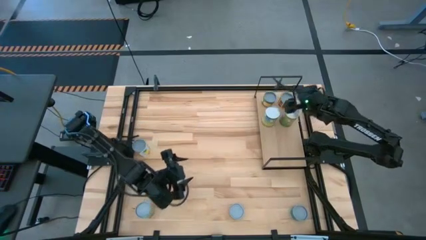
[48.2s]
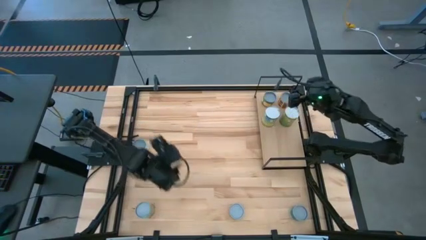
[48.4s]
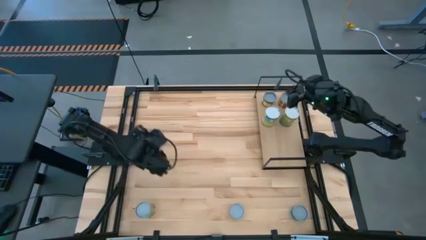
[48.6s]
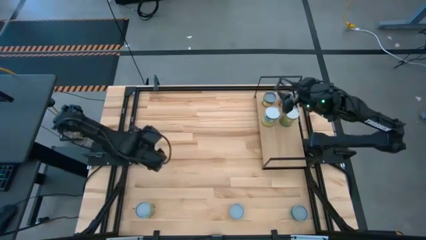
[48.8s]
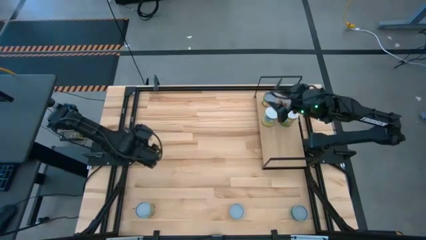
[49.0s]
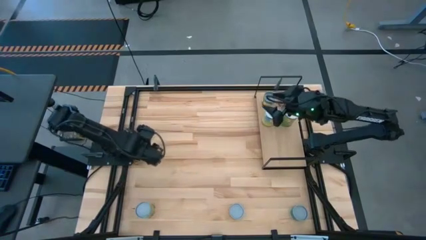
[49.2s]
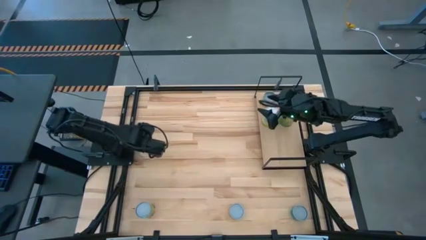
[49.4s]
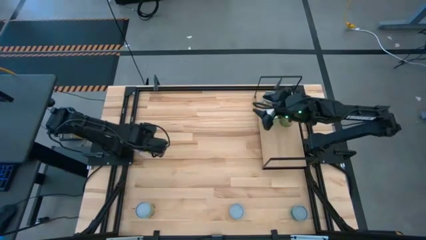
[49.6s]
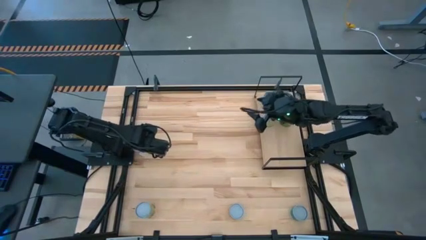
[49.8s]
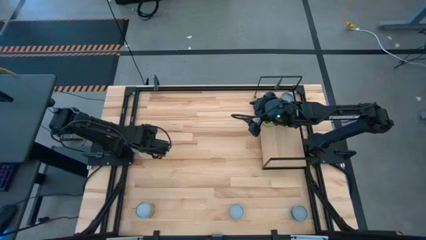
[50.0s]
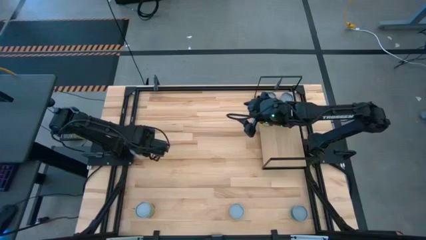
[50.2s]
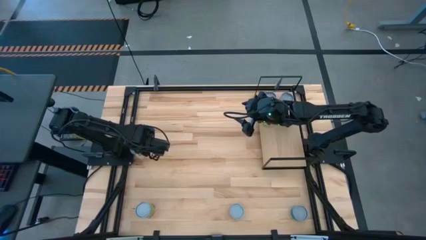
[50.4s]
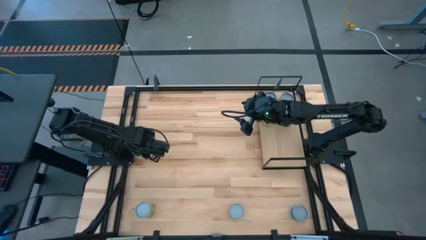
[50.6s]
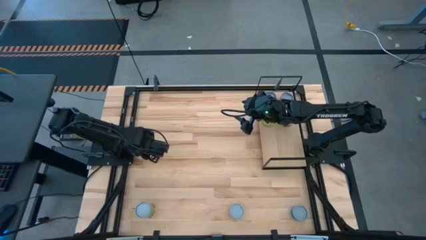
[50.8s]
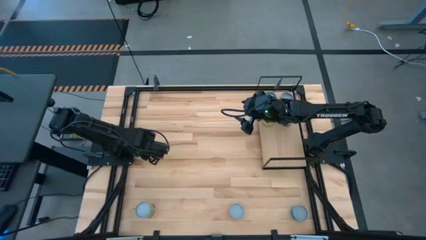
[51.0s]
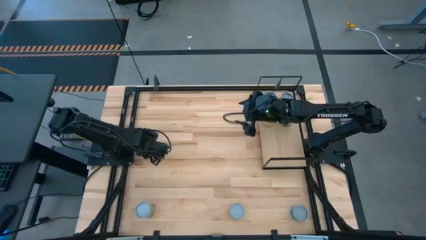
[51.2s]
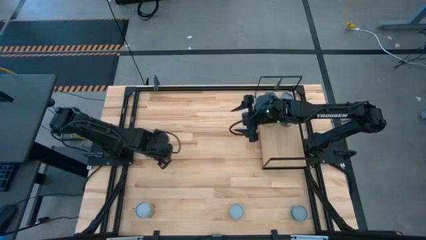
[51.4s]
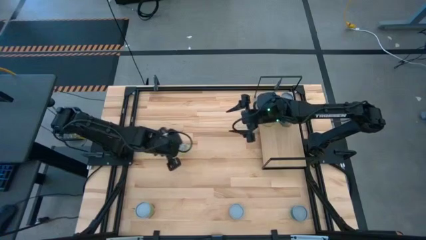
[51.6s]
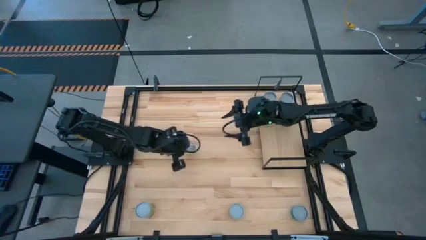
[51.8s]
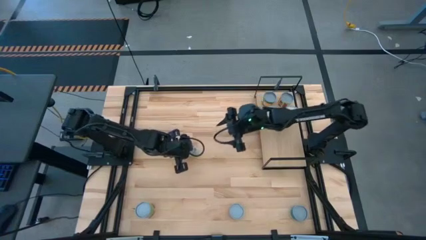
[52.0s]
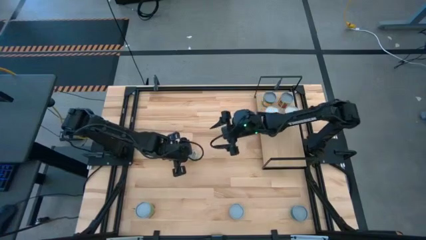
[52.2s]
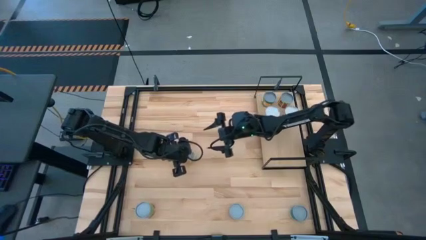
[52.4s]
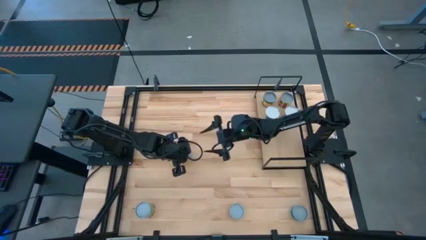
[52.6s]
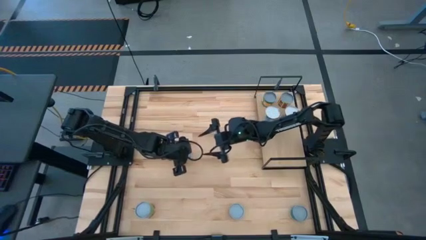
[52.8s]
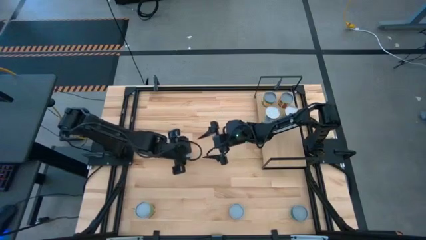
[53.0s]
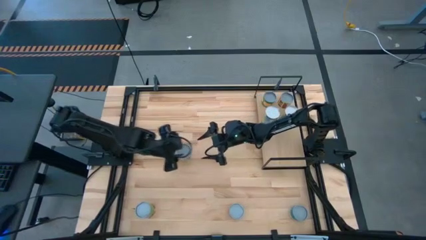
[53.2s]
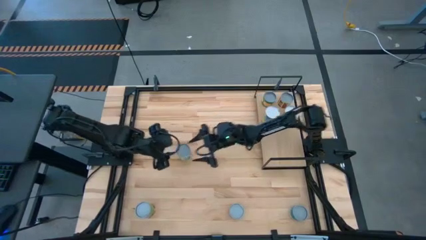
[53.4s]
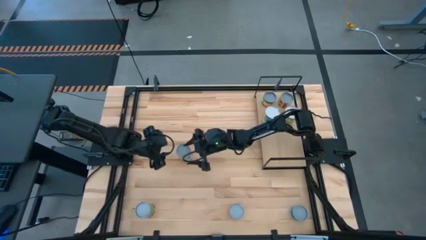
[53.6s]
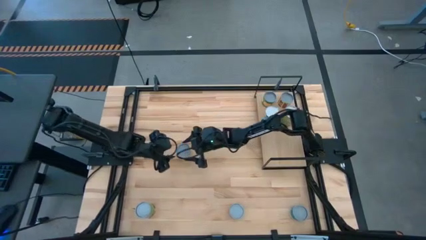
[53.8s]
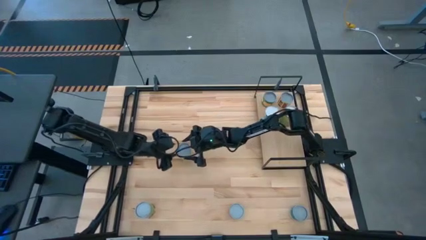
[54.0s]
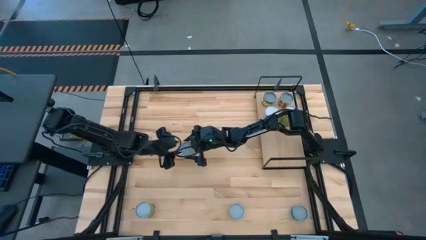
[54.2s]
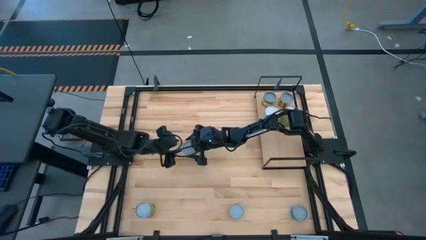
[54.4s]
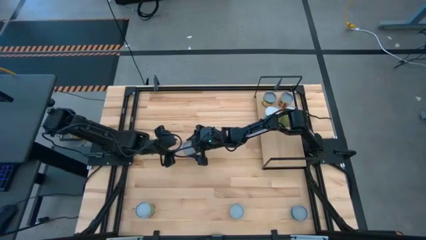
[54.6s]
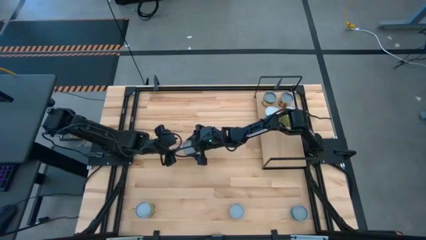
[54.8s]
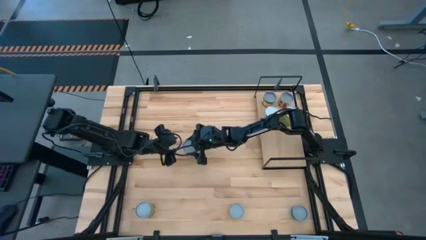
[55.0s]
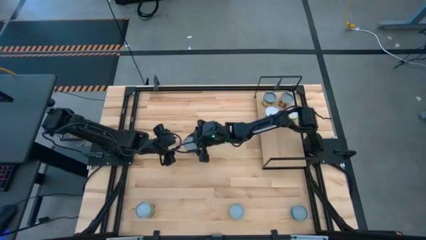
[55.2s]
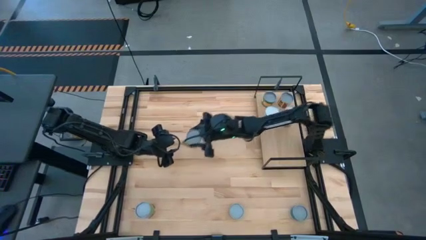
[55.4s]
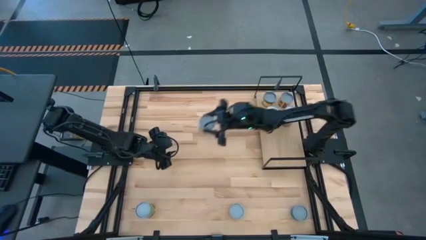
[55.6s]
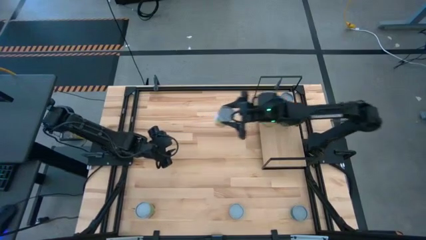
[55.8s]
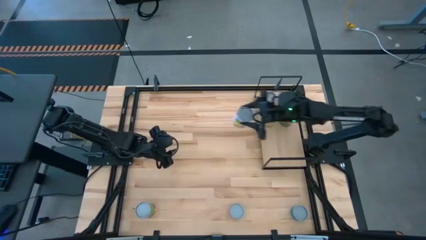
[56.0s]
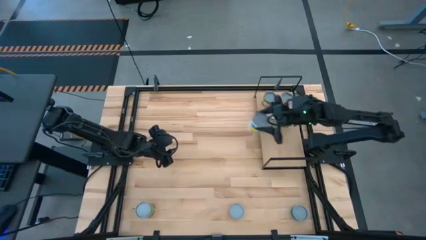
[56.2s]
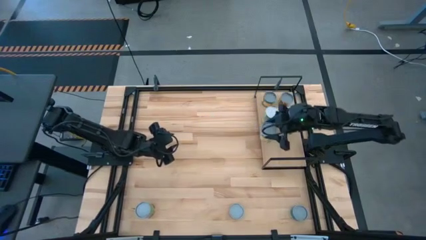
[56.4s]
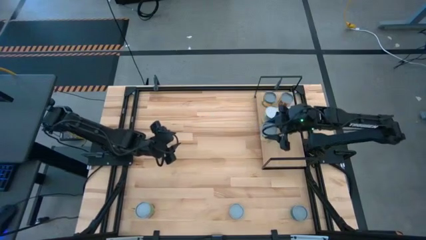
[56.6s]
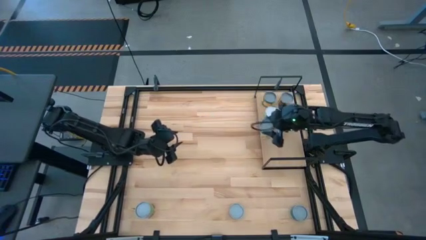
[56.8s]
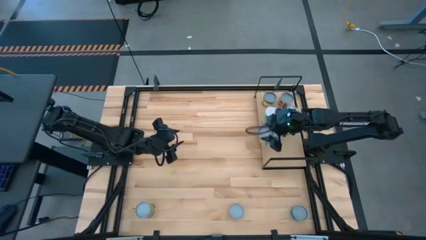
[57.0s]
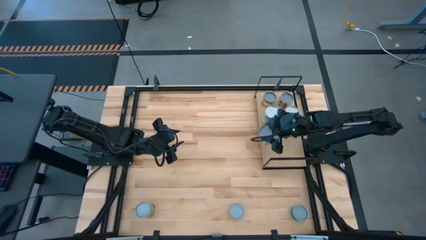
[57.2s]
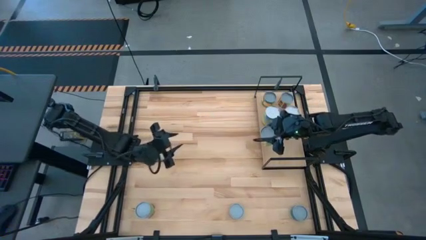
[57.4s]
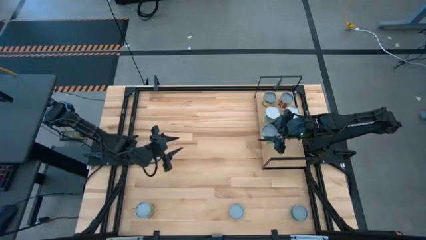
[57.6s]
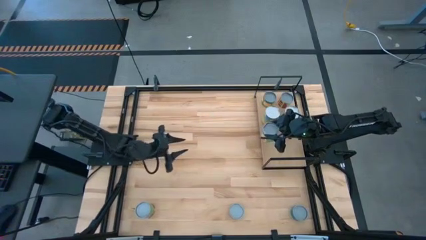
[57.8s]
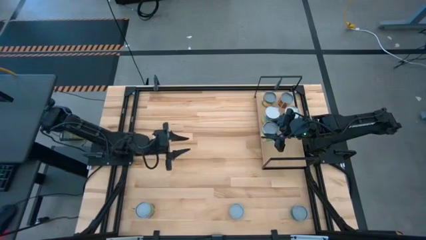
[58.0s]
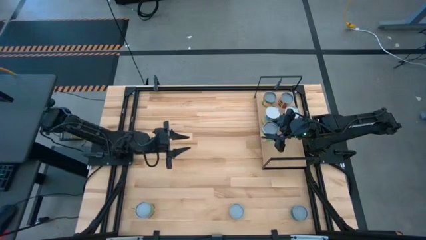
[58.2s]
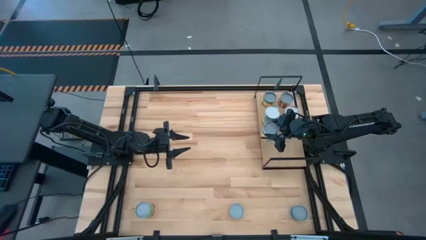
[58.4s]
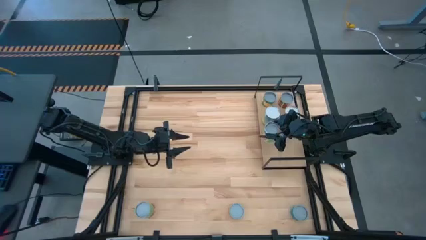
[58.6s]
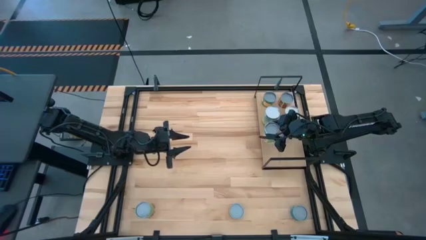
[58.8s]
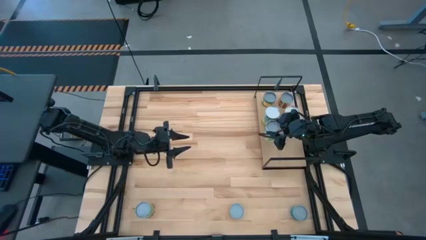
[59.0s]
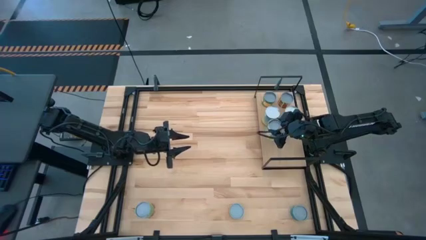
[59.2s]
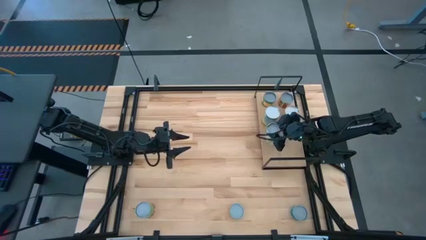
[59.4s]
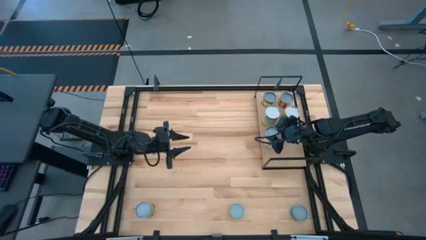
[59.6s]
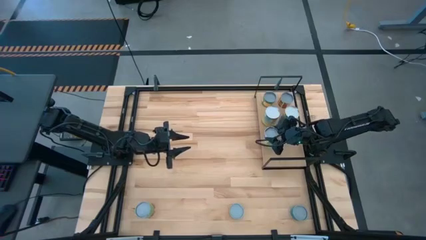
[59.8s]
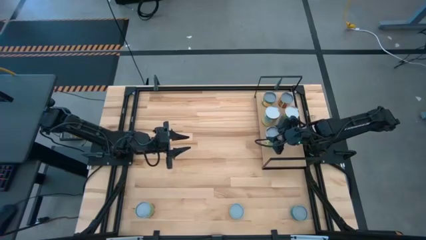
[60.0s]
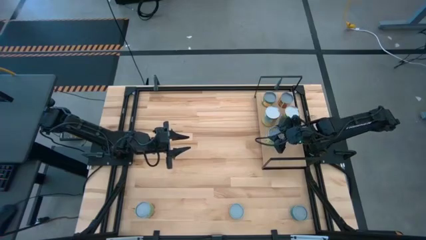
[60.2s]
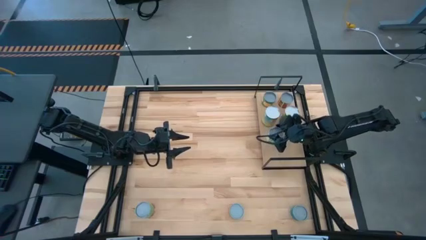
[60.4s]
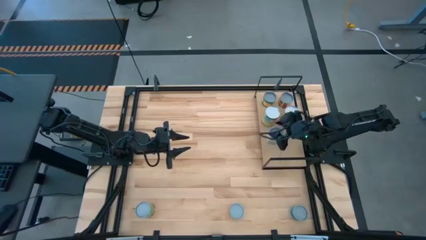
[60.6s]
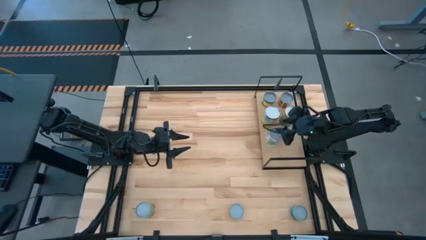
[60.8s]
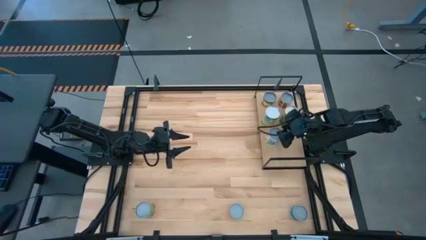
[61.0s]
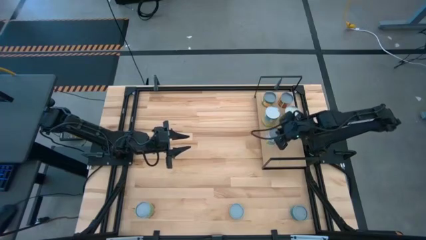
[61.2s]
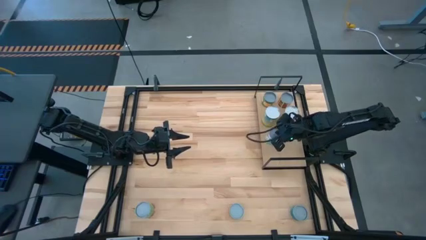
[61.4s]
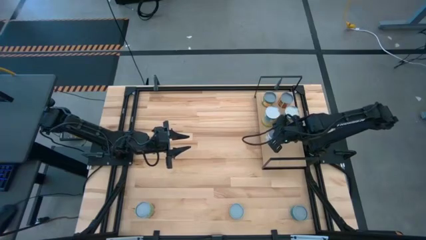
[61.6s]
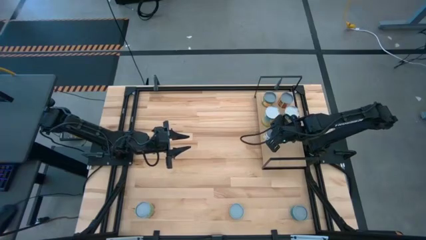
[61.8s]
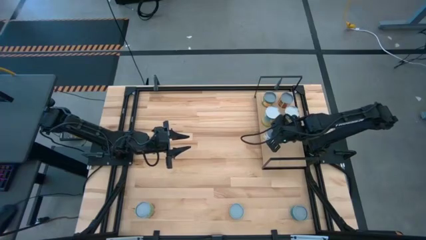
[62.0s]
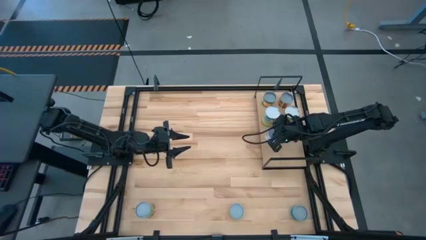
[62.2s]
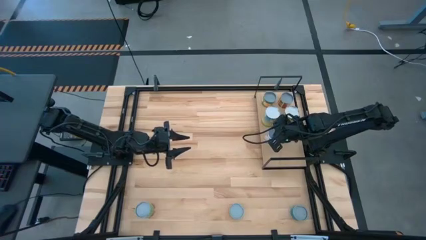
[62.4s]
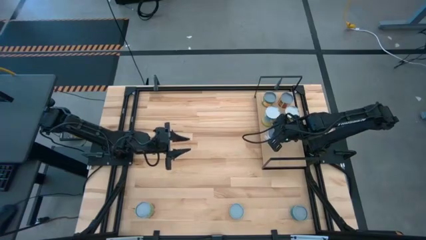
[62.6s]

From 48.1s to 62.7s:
Task: Pick and place cans onto a shelf
Put the canned mixed fruit on the shelf

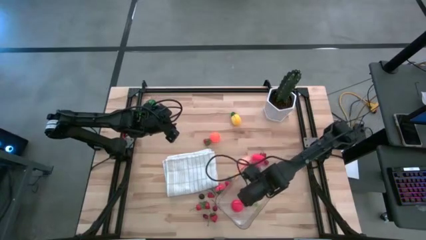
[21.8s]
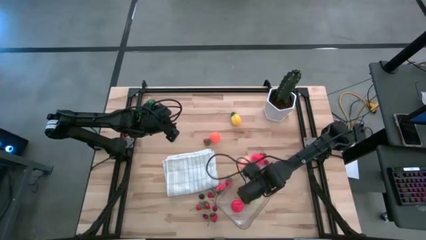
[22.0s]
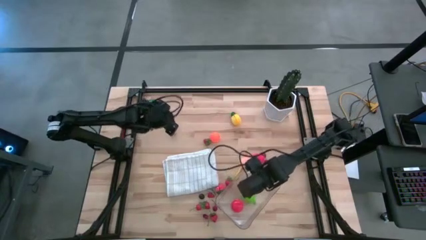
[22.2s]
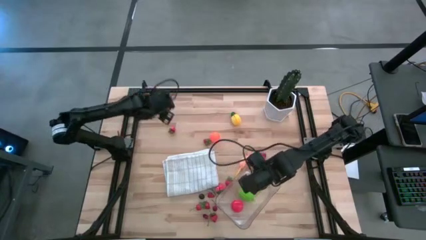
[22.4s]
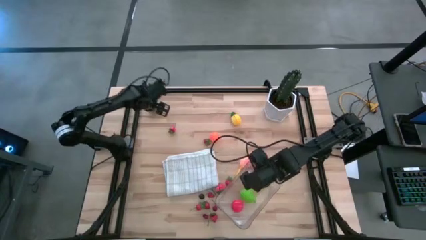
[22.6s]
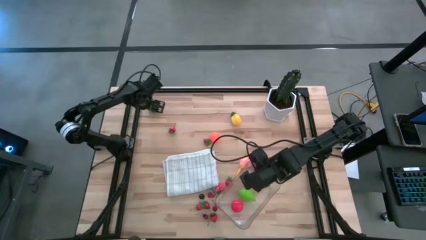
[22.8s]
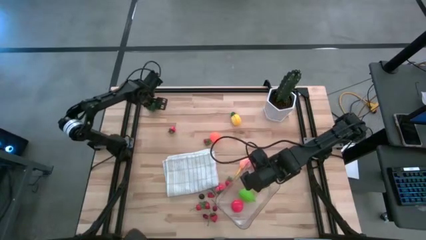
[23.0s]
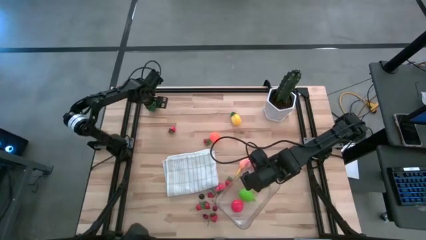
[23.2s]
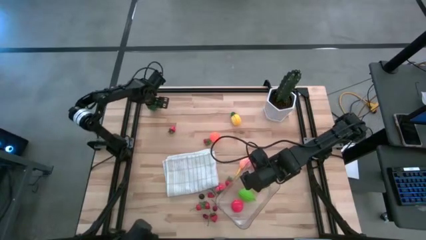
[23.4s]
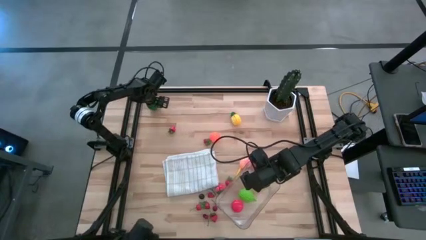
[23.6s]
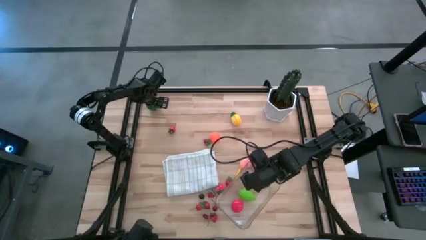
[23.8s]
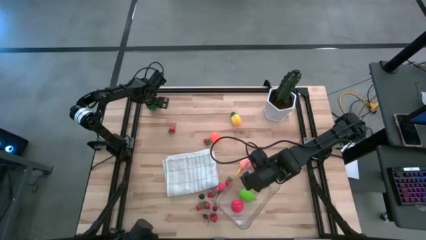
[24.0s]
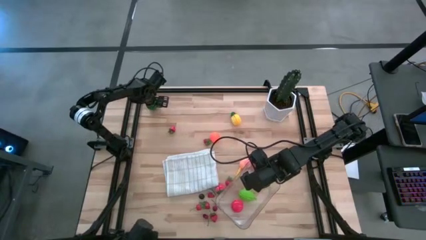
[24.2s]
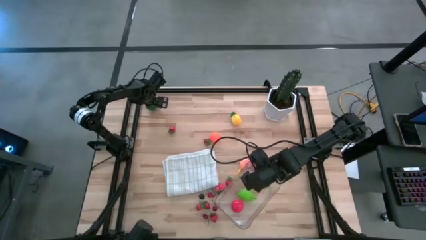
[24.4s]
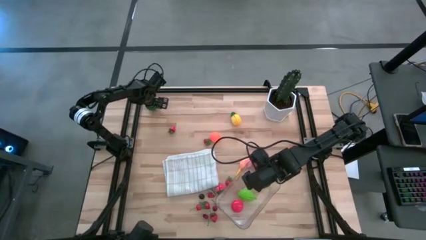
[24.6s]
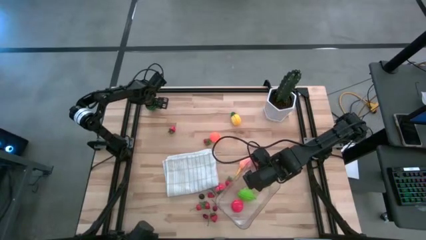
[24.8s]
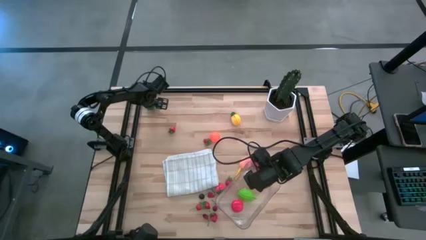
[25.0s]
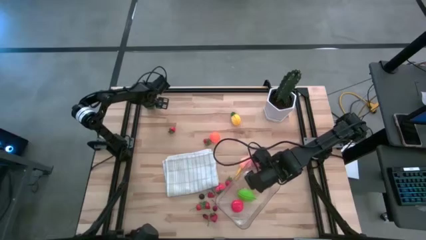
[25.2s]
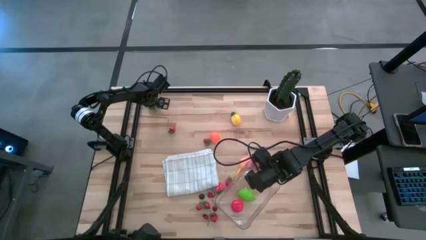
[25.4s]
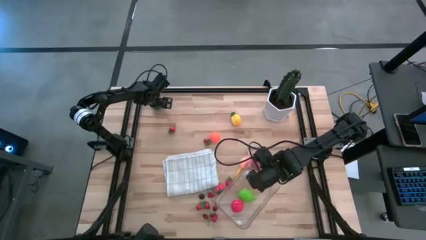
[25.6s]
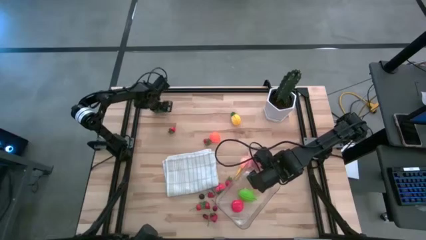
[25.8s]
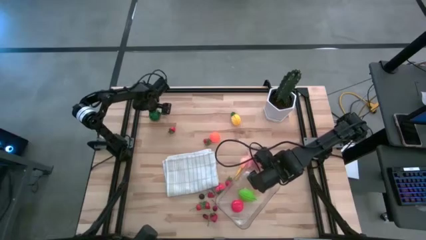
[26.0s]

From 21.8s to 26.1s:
Task: Pick and placing Produce into tupperware
Put the watermelon into the transparent bin
